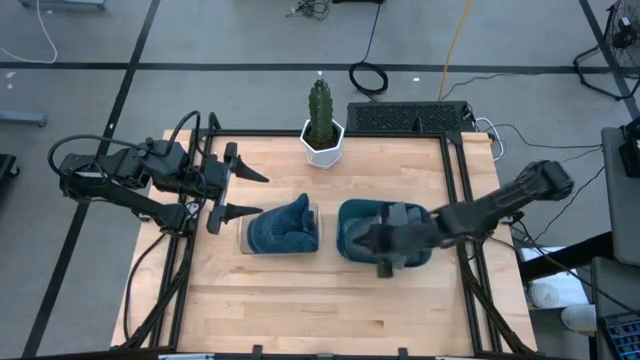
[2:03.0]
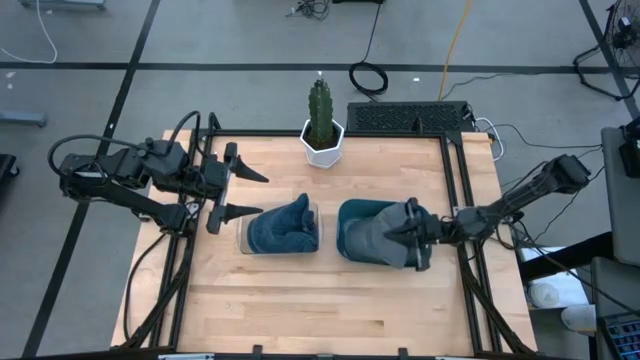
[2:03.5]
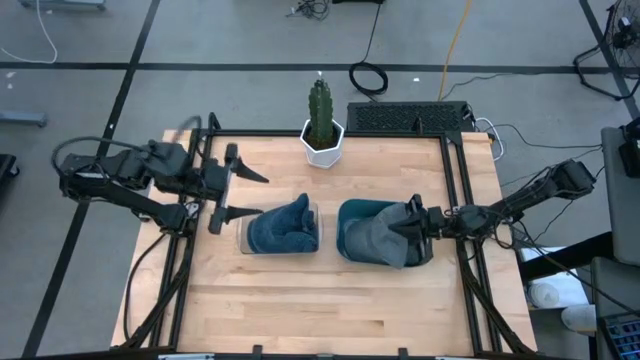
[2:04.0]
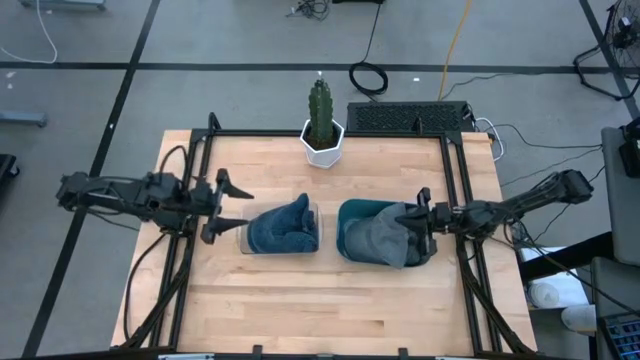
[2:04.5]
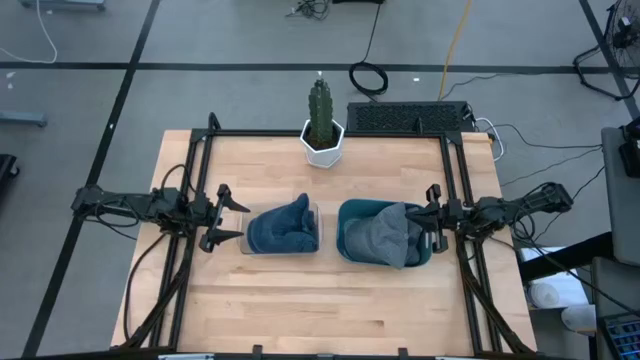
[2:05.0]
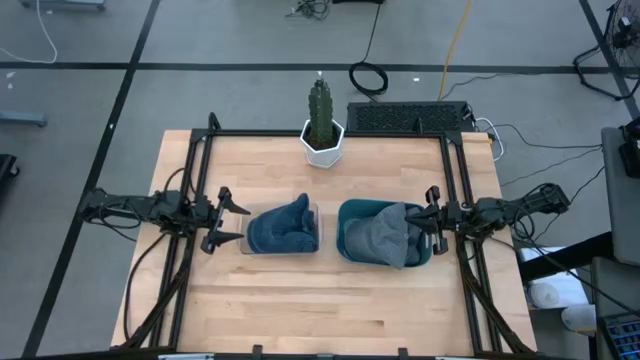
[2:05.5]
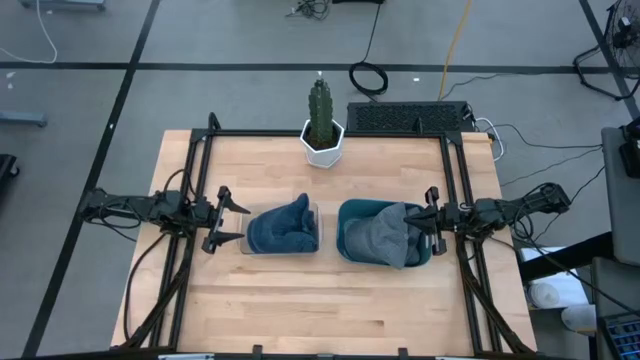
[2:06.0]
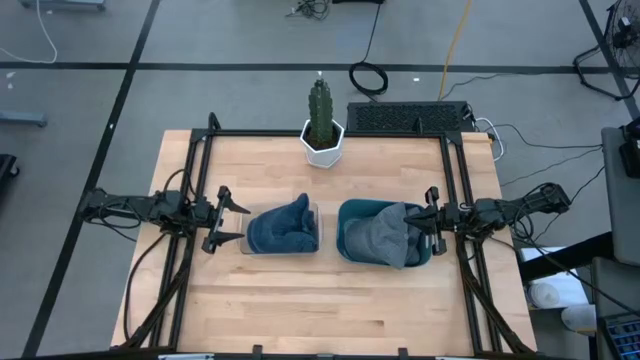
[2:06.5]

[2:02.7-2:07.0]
Task: Pick & Place hat
Return to home position

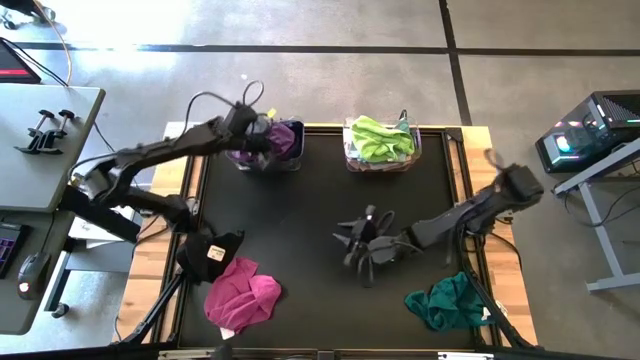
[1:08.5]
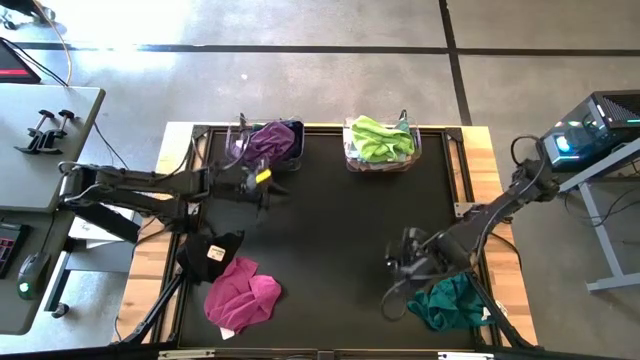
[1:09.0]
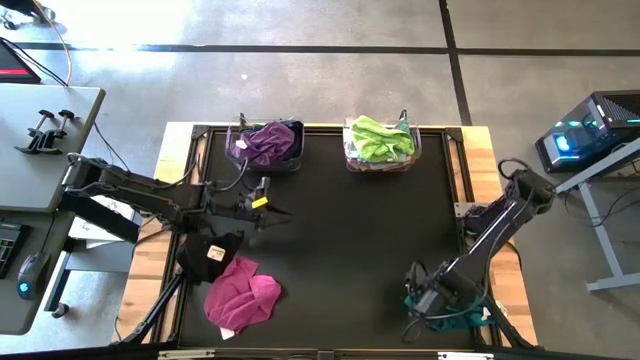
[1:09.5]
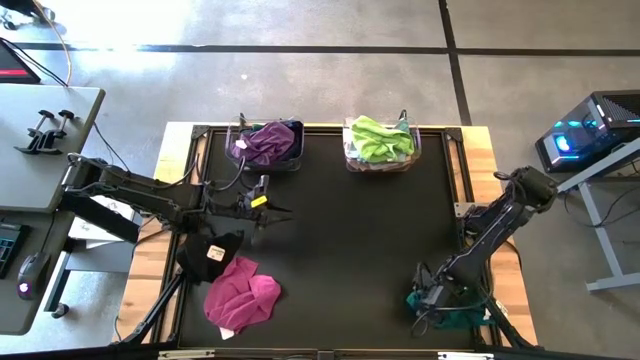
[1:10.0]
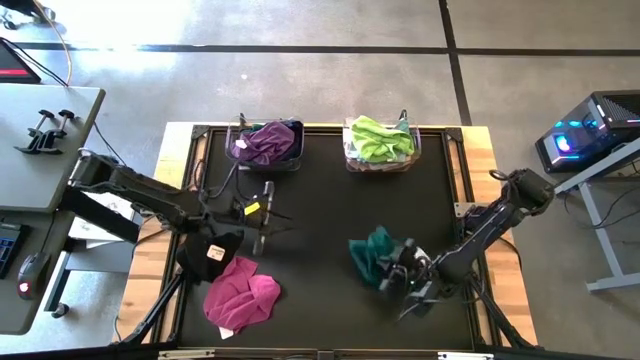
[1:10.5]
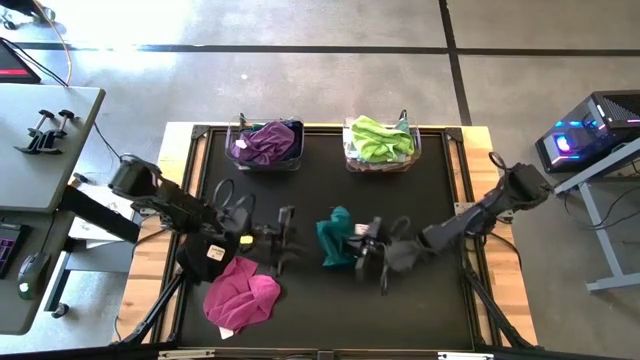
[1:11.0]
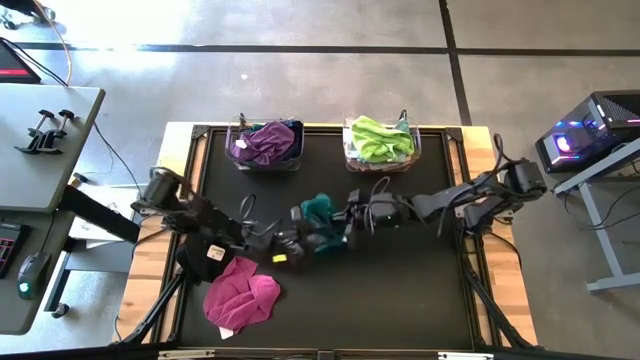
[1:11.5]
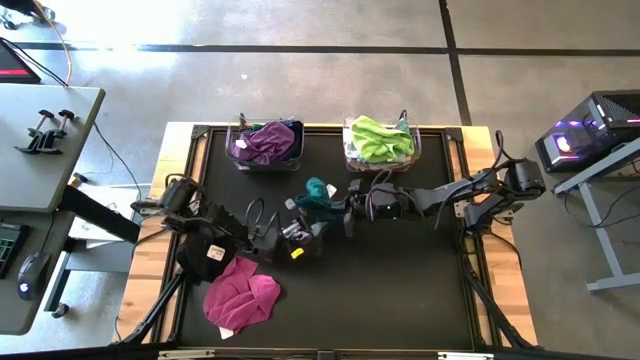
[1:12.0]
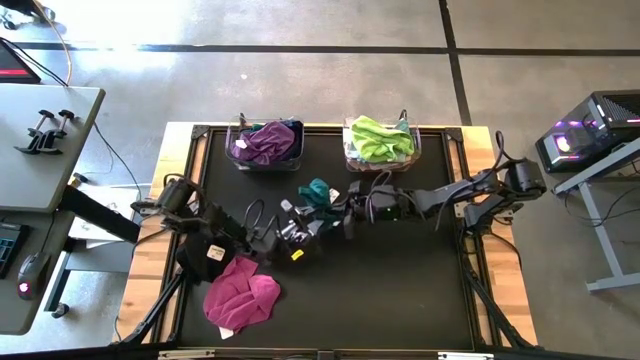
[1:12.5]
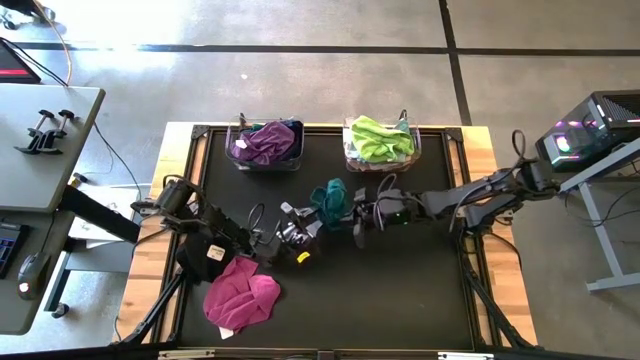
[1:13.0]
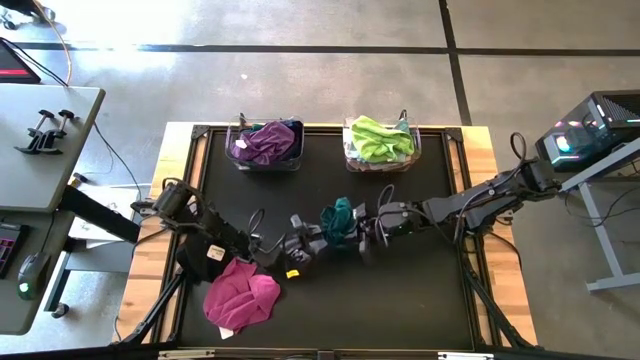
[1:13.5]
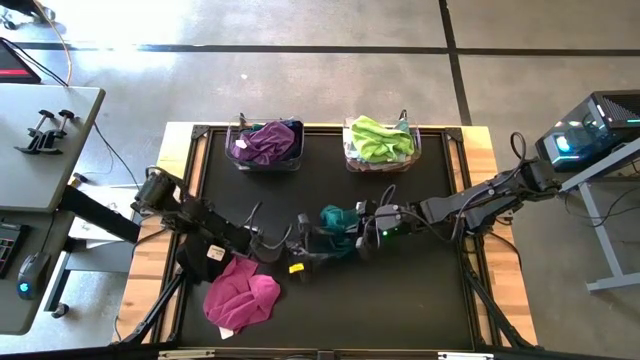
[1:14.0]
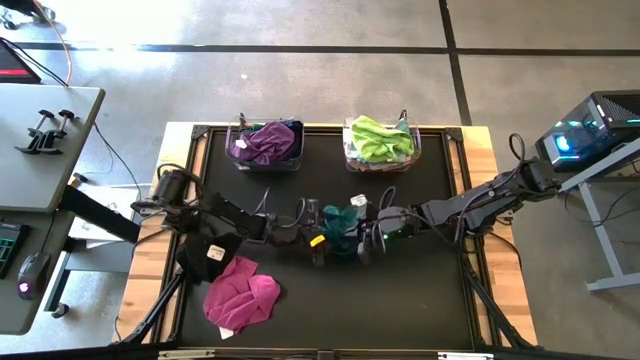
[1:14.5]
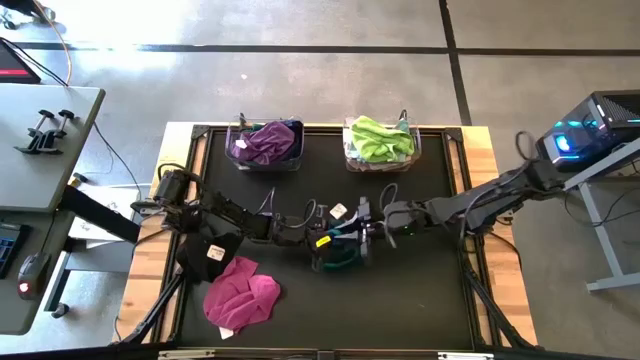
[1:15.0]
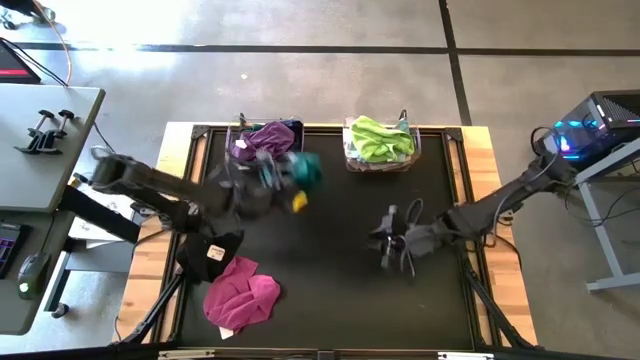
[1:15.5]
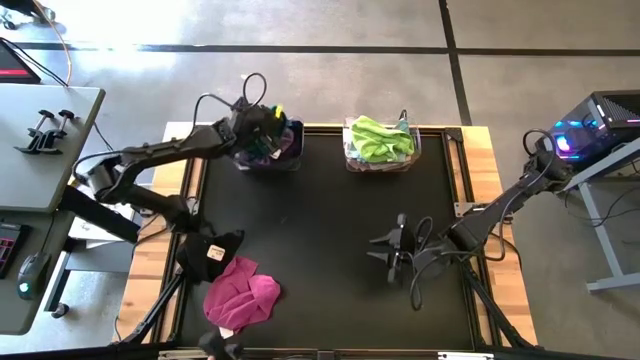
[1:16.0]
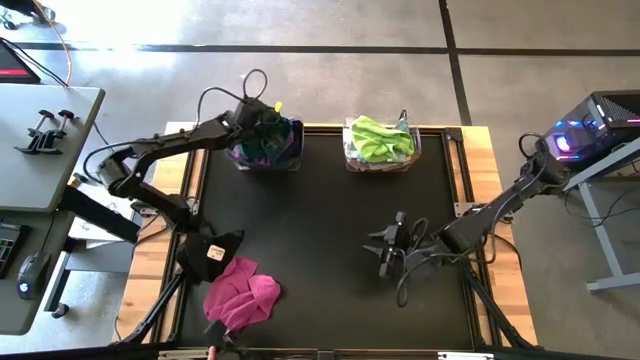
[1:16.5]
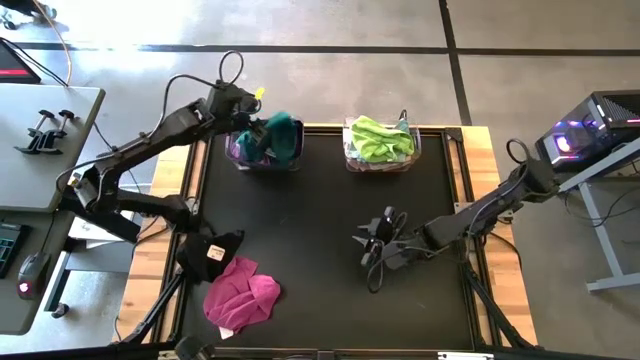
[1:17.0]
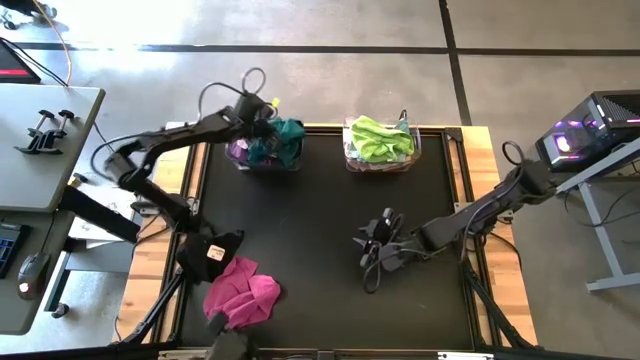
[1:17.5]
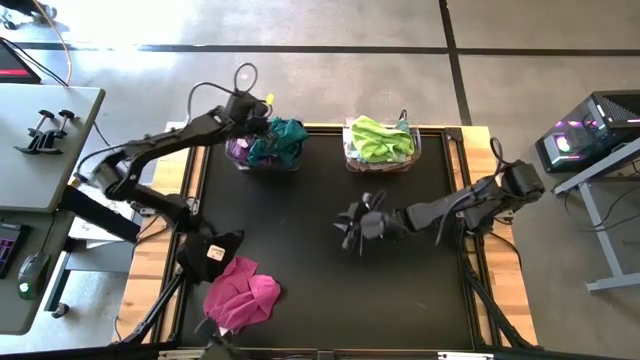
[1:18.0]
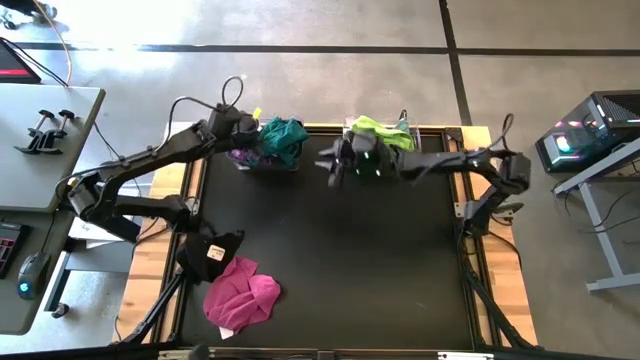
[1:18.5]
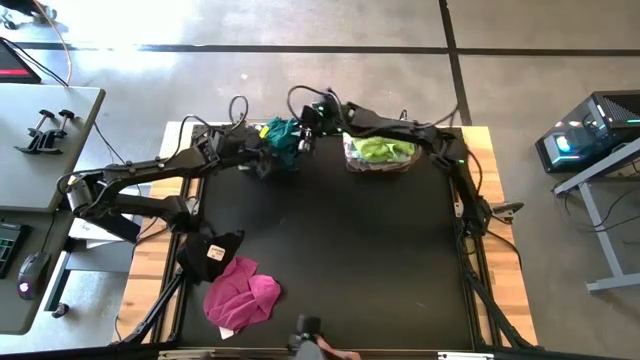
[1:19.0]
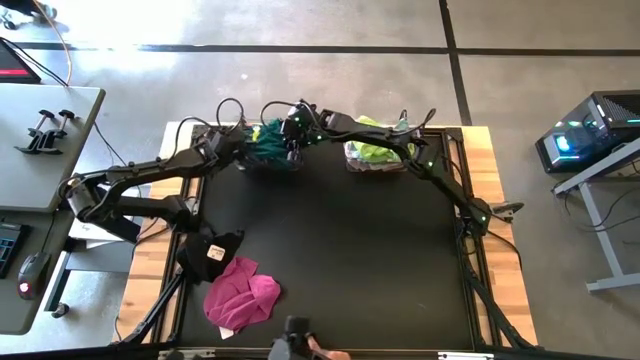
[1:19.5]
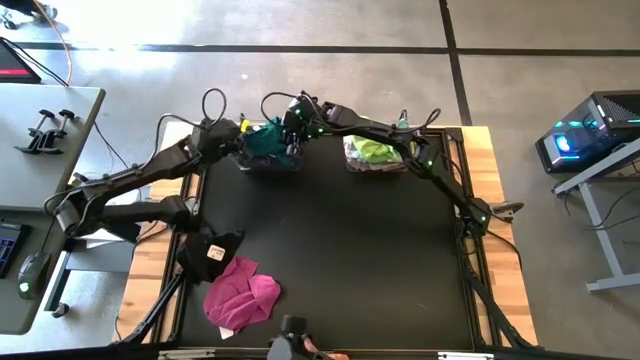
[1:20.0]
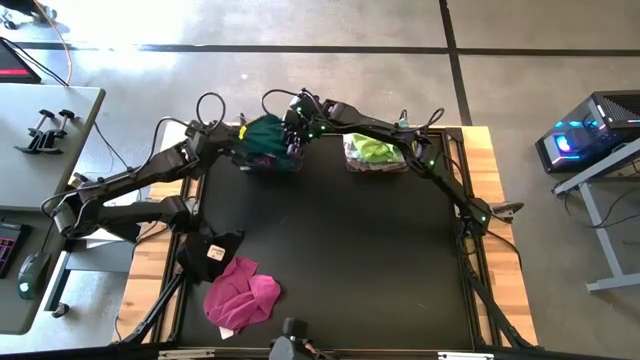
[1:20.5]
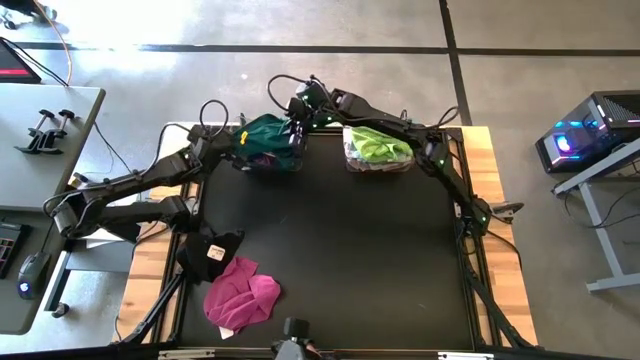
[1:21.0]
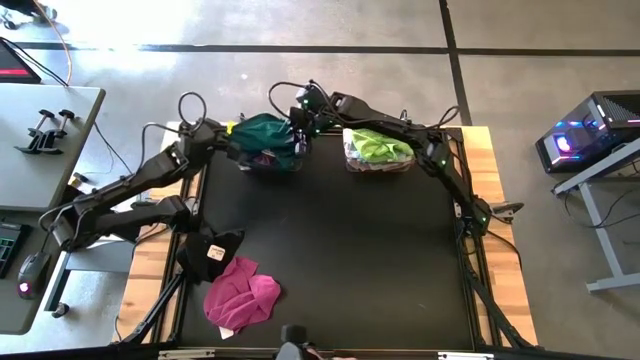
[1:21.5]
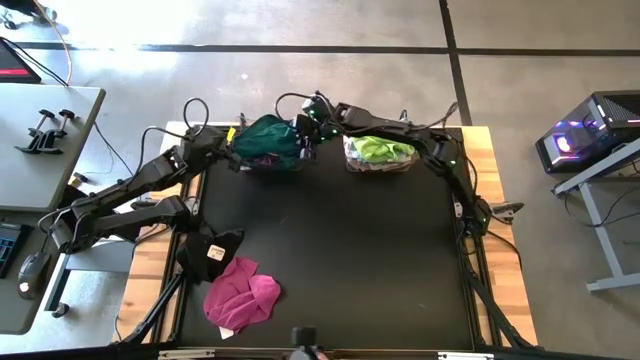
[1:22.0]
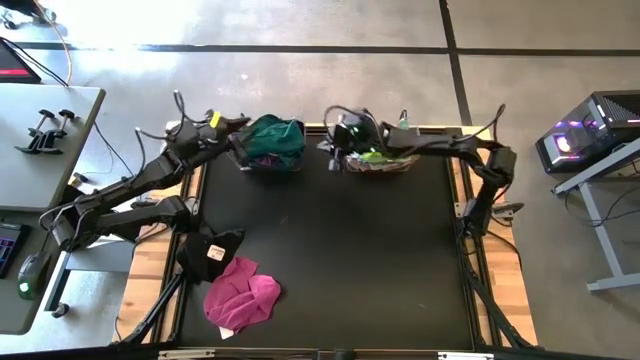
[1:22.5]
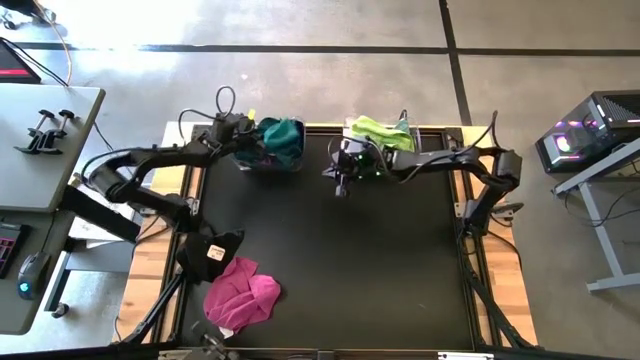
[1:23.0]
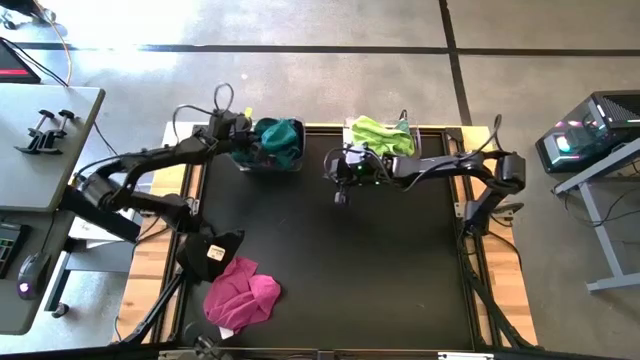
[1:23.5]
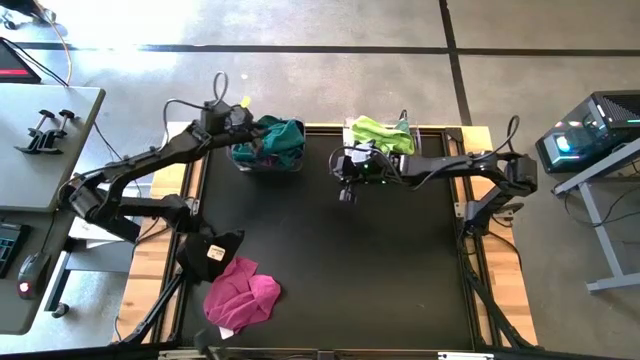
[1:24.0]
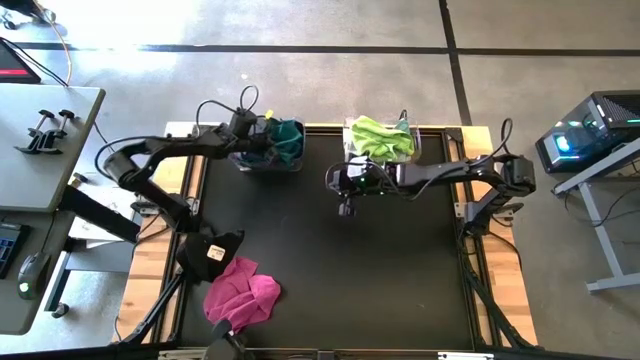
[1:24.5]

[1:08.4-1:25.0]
Task: Sort towels by color in basket
Put the green kitchen towel into the left transparent bin
